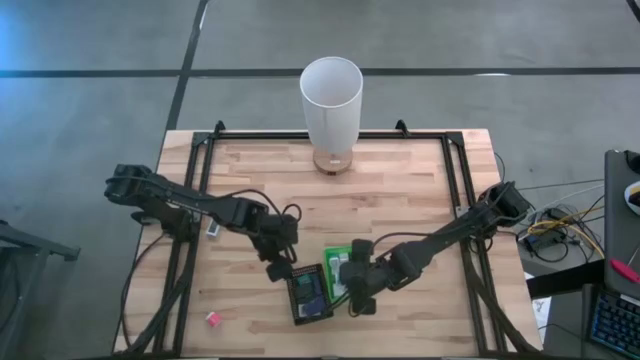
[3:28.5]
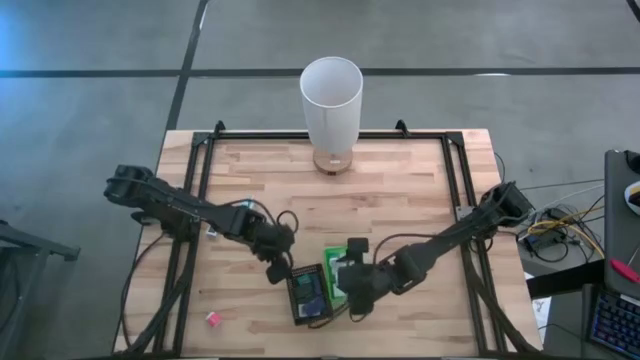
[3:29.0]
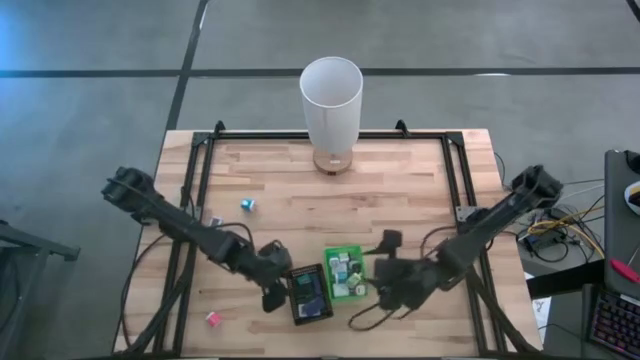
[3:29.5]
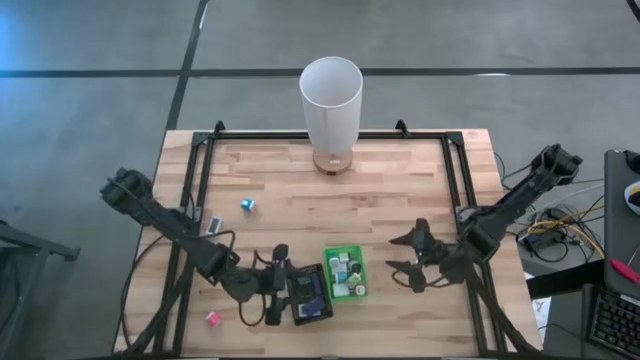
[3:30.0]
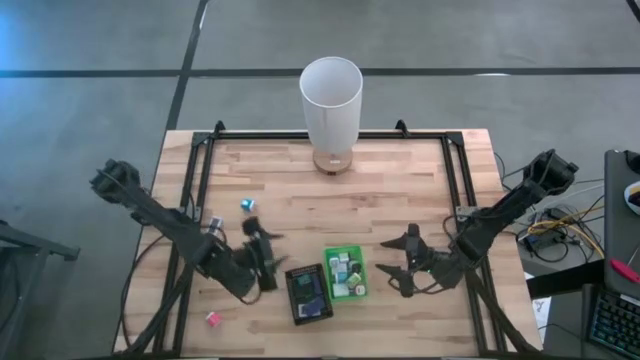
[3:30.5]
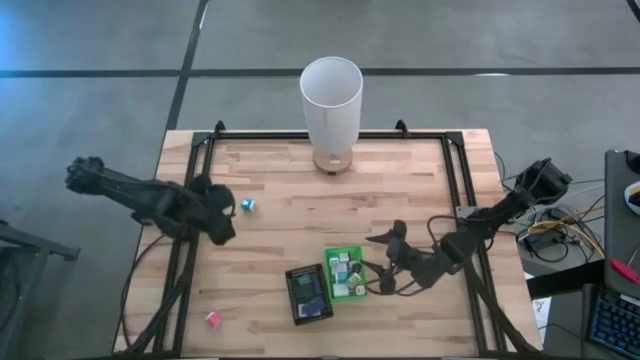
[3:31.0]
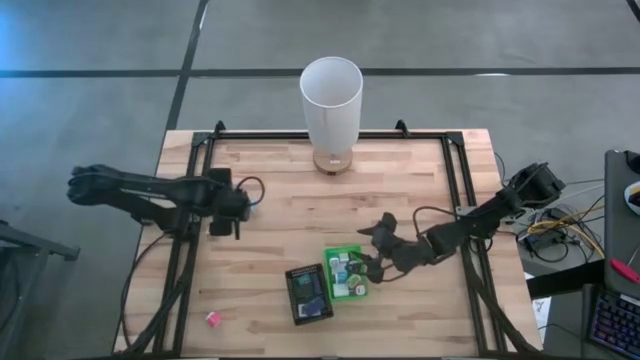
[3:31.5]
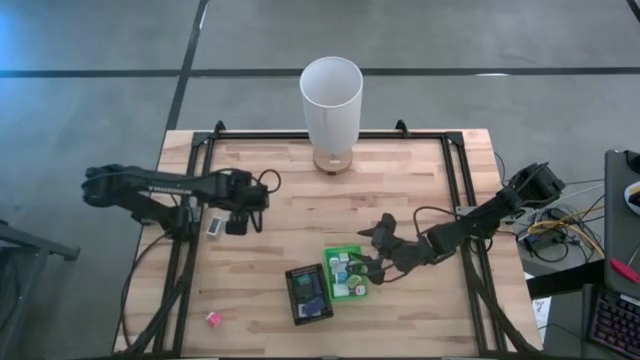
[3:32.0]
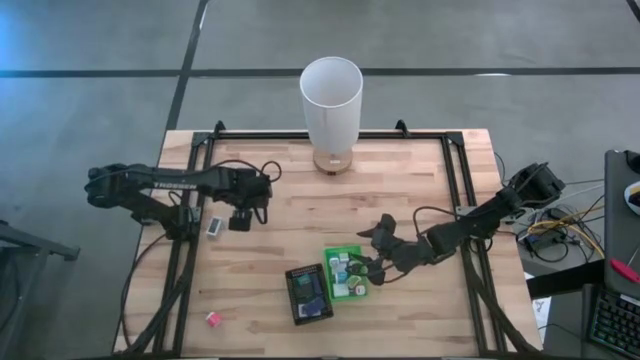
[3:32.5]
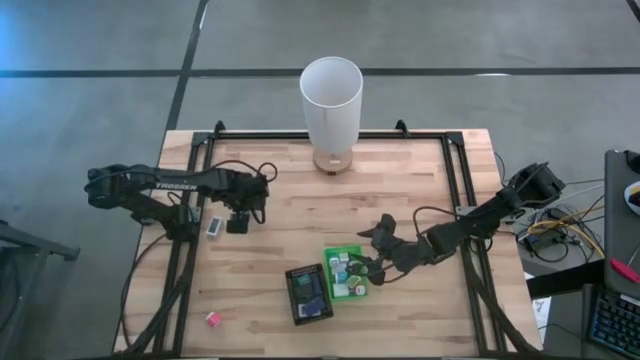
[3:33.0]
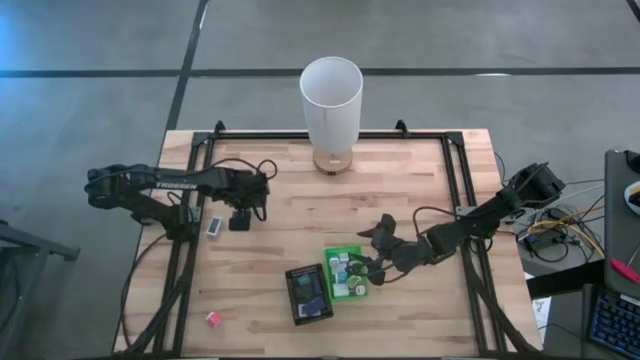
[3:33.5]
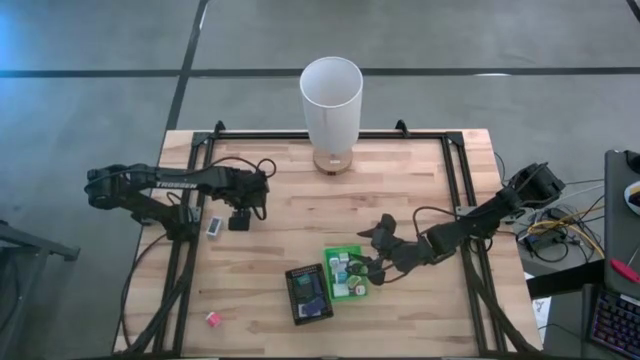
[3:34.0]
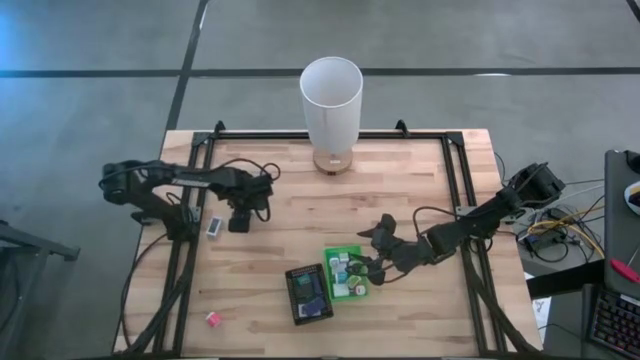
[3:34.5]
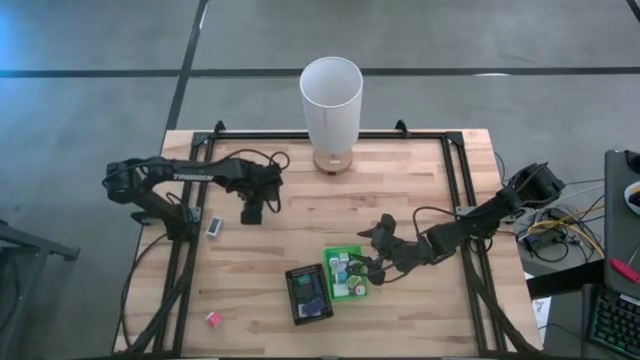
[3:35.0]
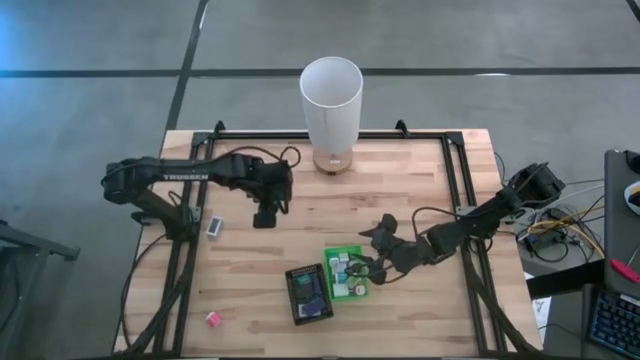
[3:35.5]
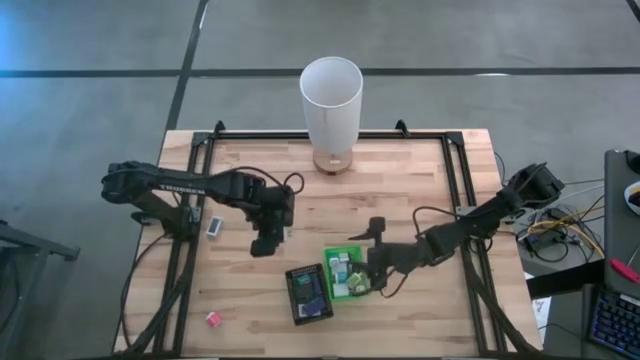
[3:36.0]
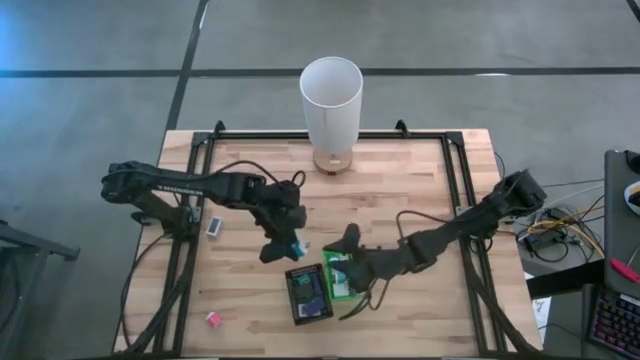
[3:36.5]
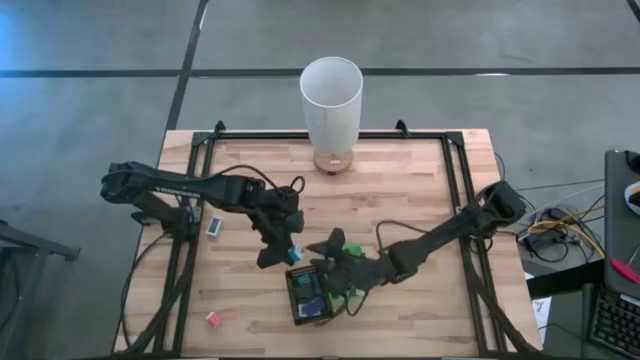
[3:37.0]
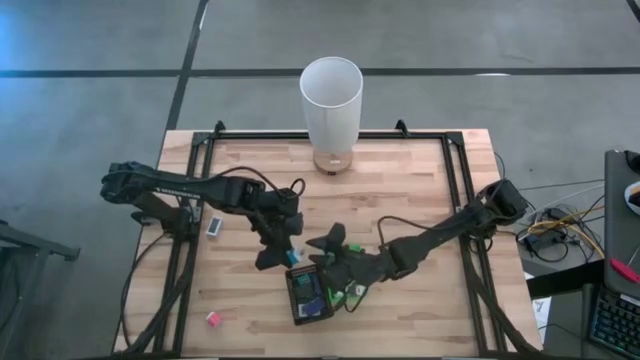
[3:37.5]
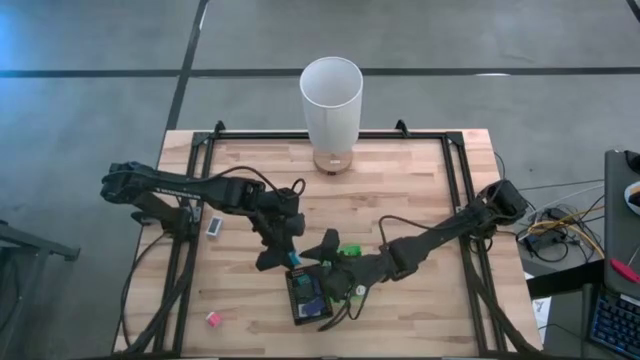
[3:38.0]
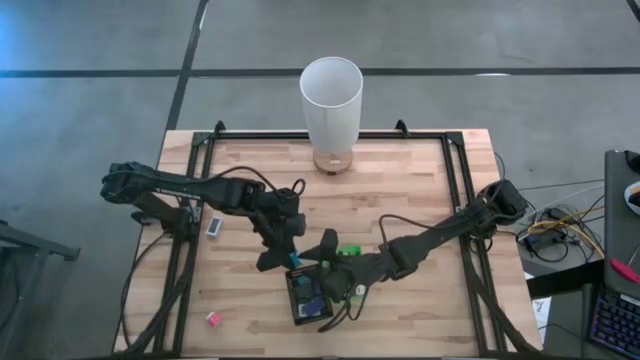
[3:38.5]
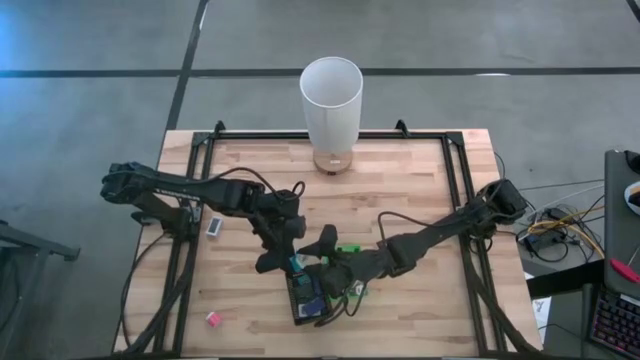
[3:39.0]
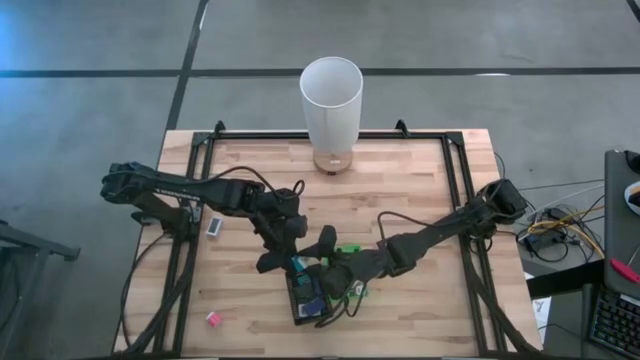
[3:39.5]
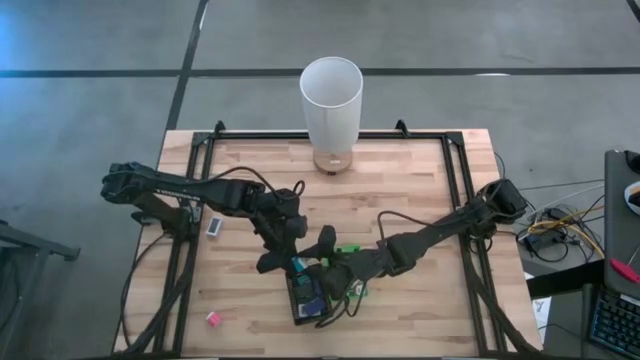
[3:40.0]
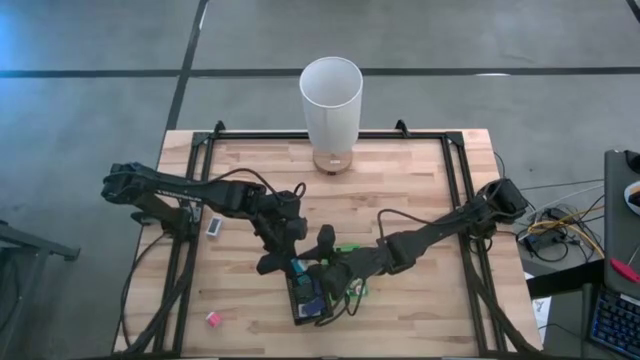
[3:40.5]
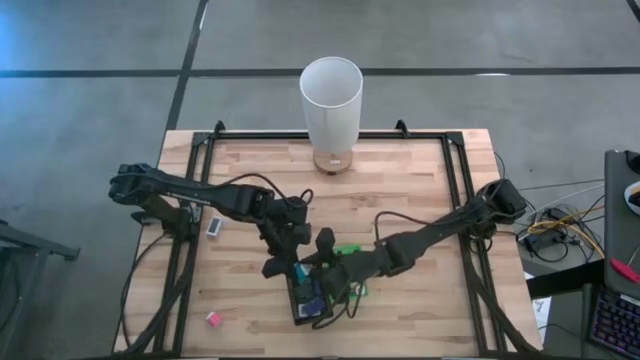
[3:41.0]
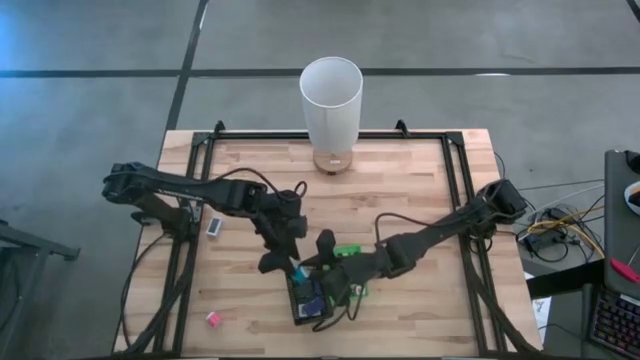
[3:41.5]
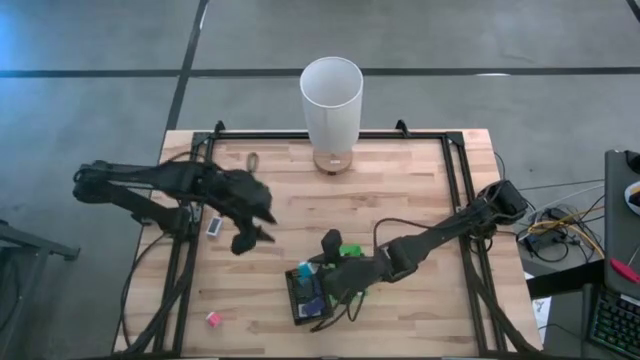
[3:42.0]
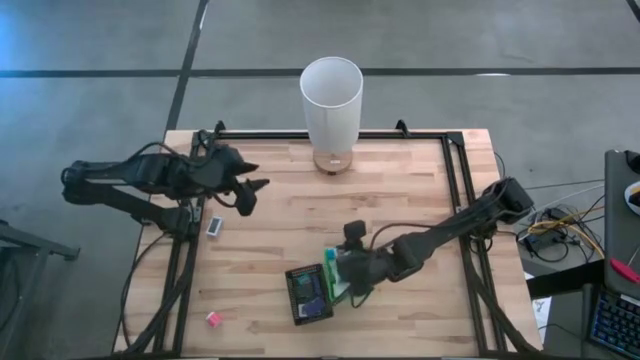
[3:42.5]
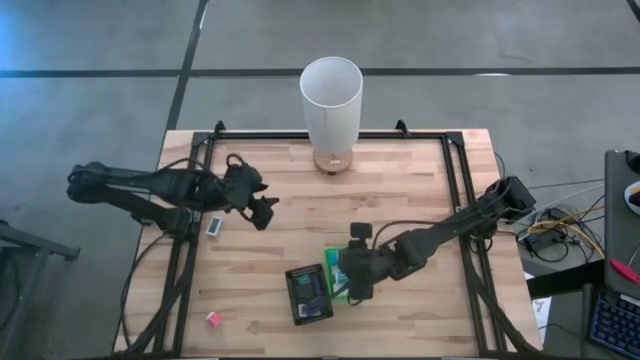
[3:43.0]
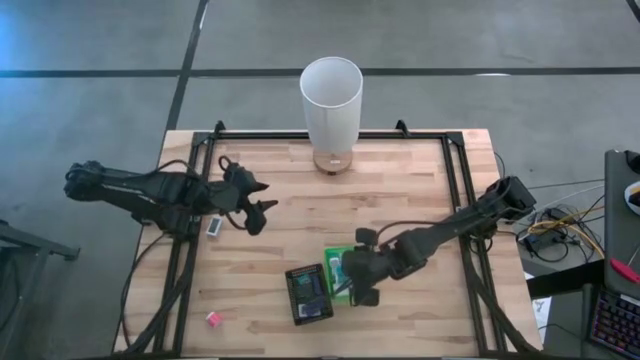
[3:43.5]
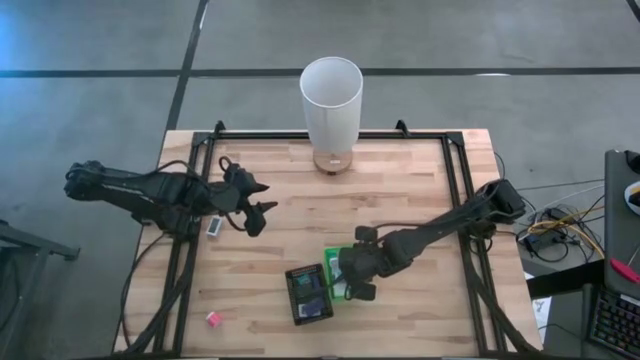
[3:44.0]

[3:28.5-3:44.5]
Task: Pick & Place Office items
Put the blue charger adapter into the green bin

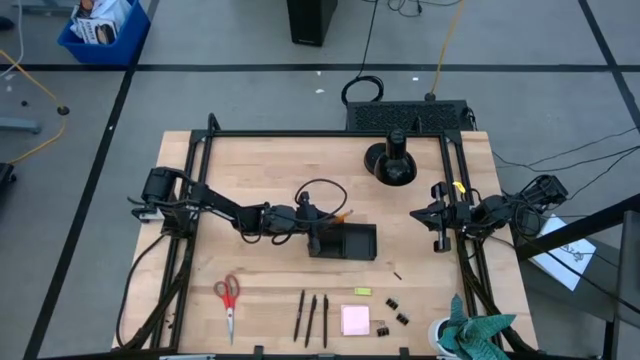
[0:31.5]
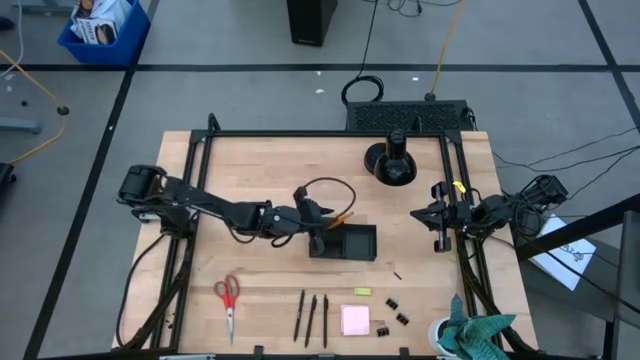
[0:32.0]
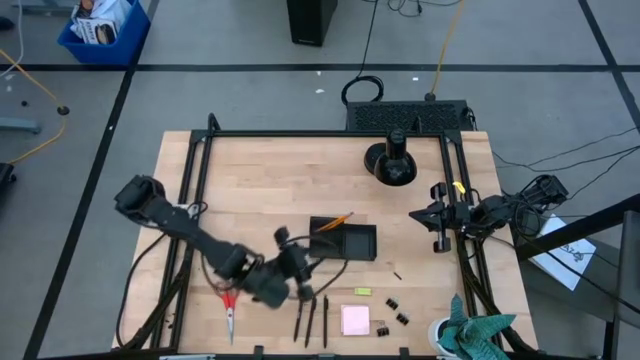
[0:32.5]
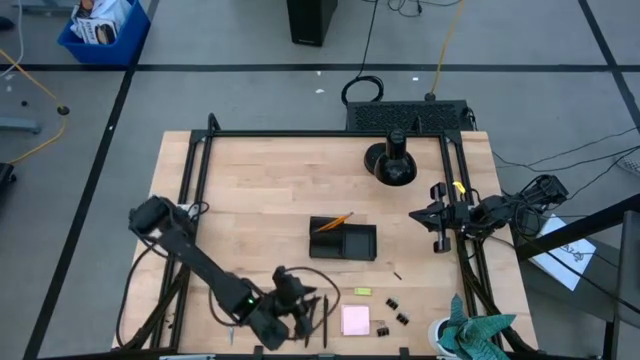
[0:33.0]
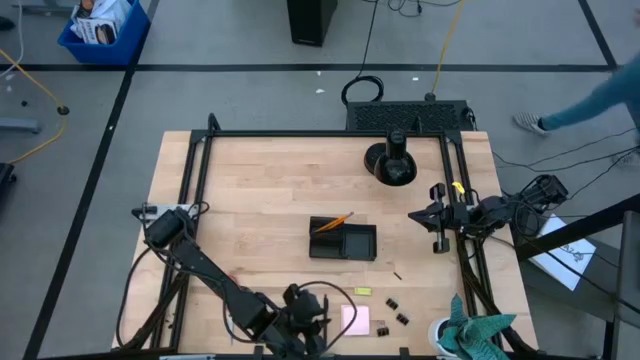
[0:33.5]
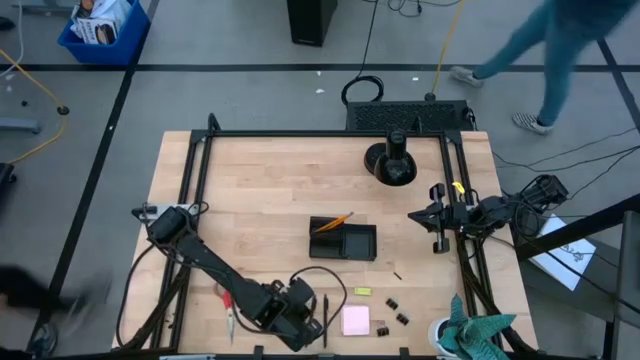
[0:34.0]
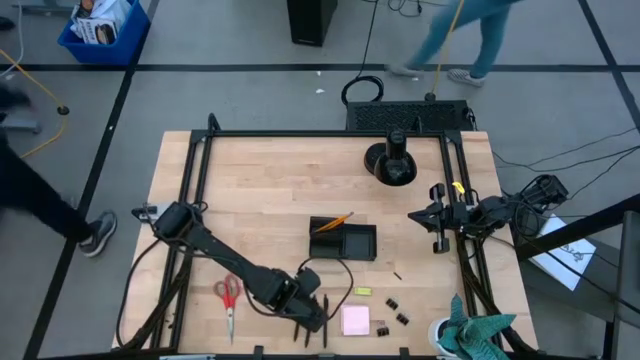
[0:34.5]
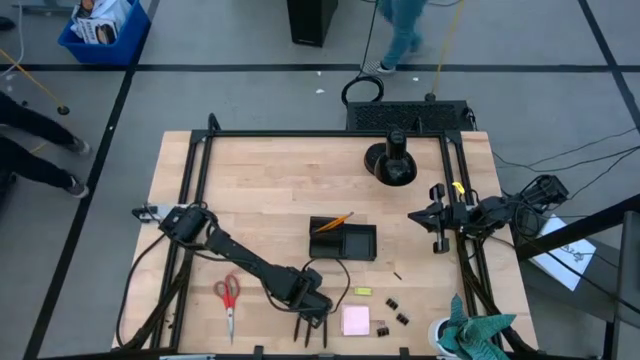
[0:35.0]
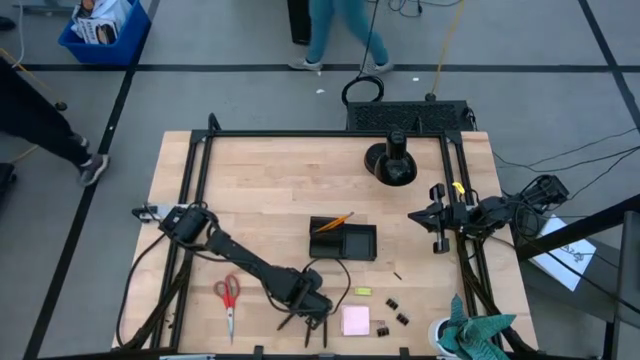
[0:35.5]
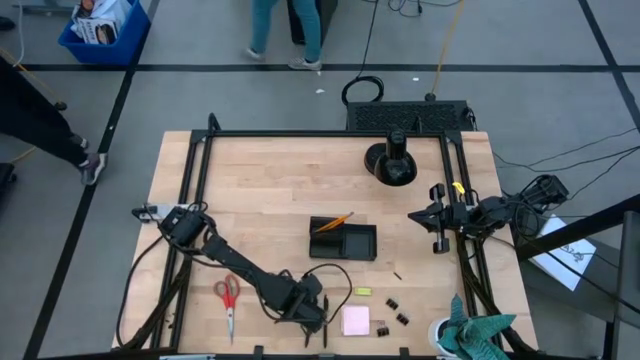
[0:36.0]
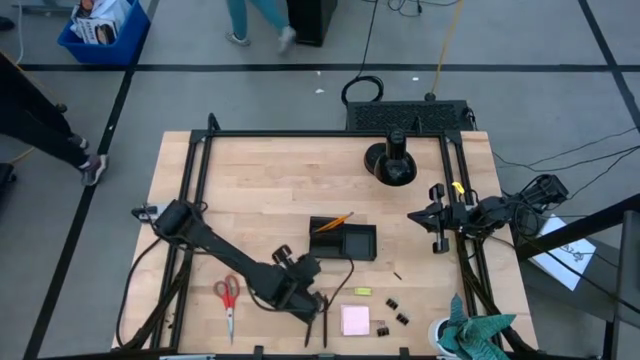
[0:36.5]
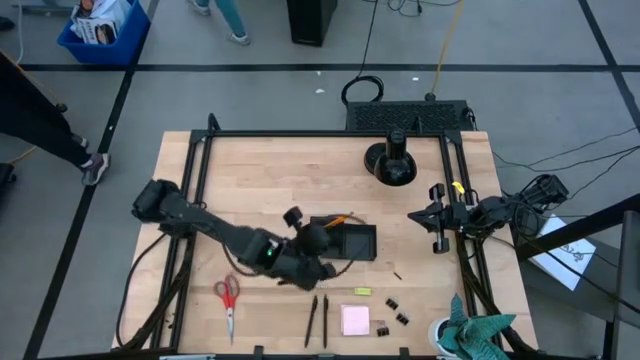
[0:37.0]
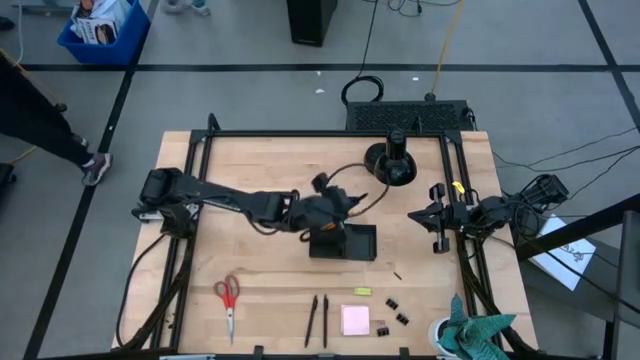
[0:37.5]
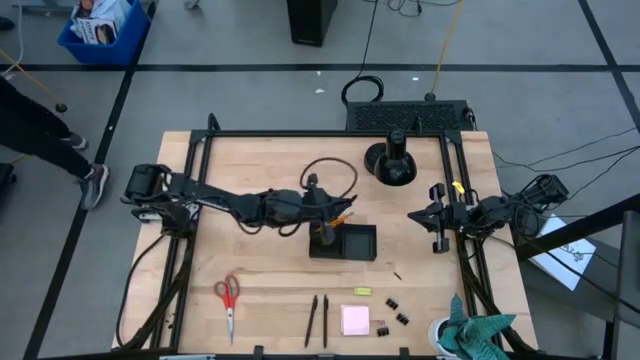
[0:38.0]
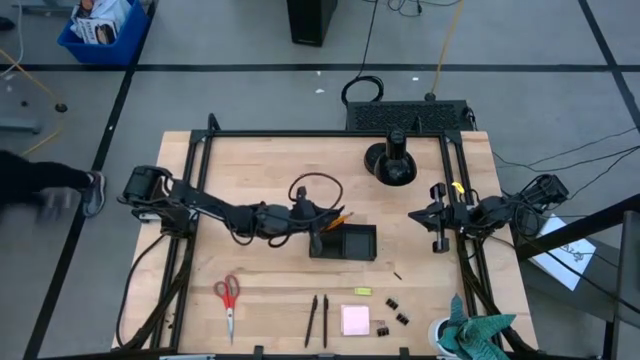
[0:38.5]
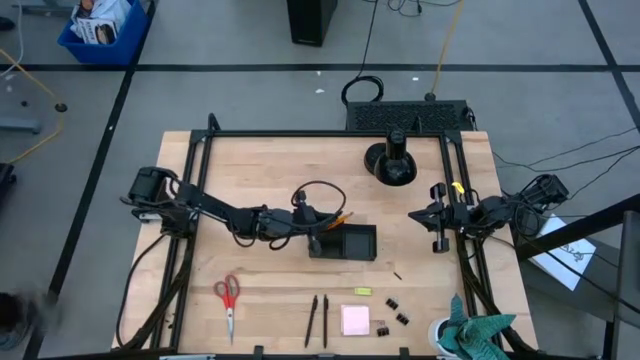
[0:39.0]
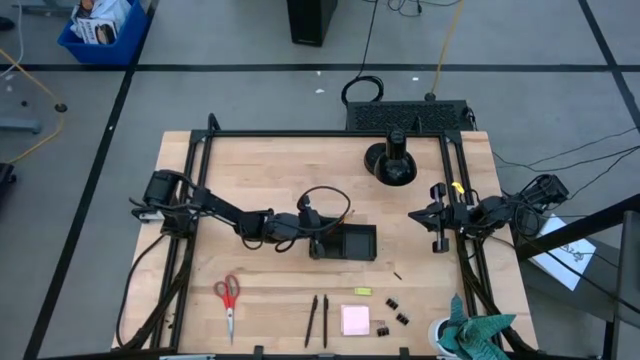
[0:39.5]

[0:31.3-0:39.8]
Task: Pick and place office supplies into organizer
Put the black pen into the black desk organizer
